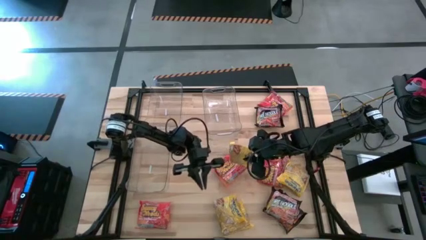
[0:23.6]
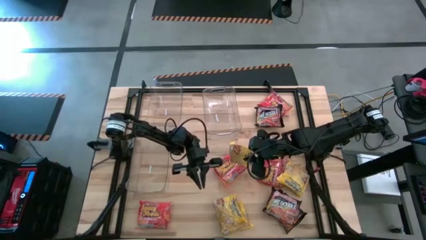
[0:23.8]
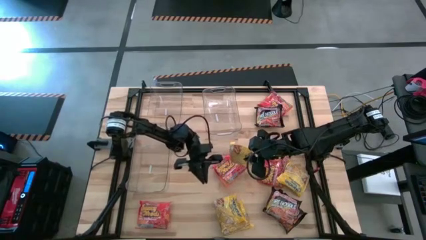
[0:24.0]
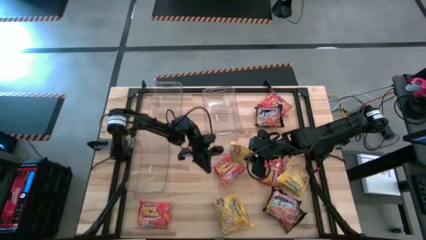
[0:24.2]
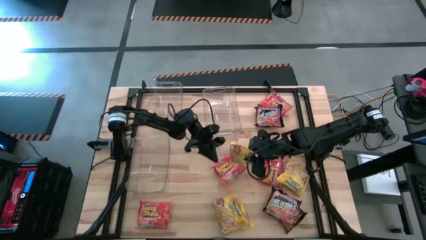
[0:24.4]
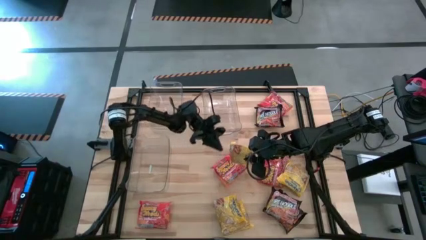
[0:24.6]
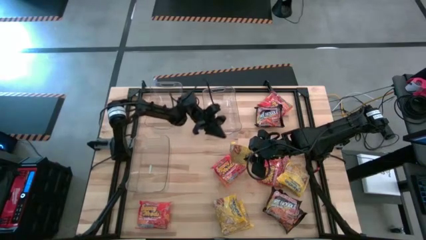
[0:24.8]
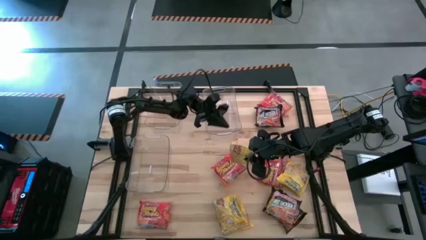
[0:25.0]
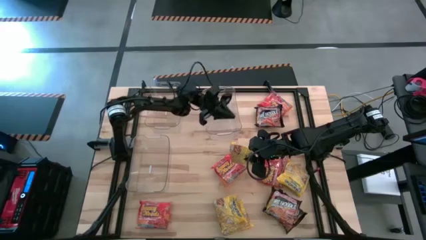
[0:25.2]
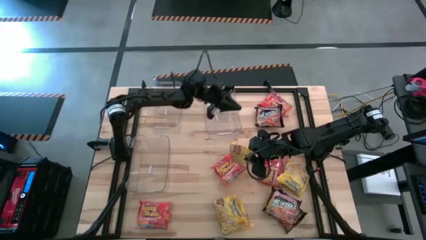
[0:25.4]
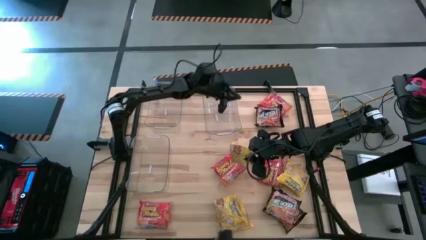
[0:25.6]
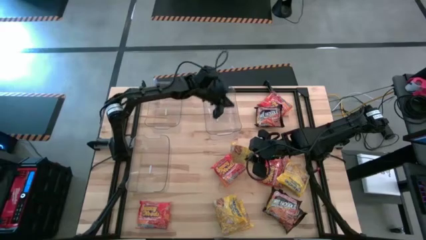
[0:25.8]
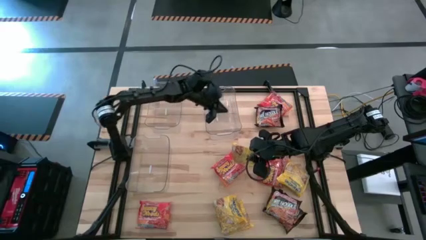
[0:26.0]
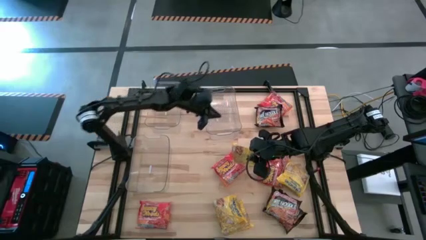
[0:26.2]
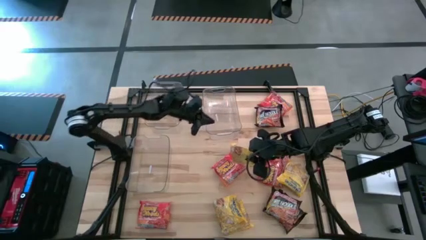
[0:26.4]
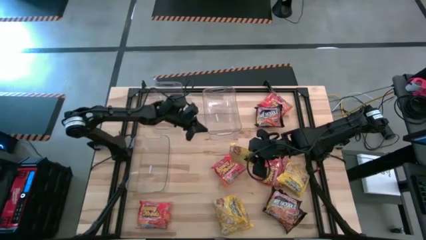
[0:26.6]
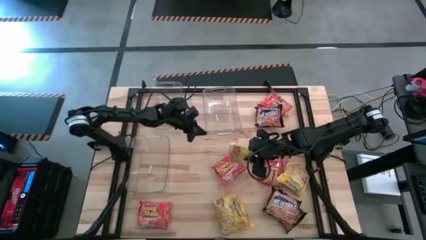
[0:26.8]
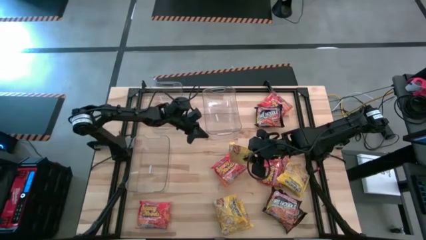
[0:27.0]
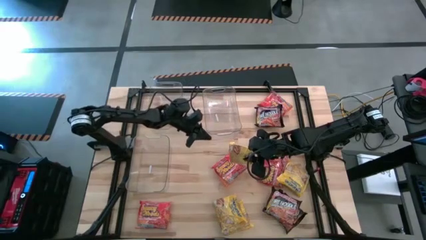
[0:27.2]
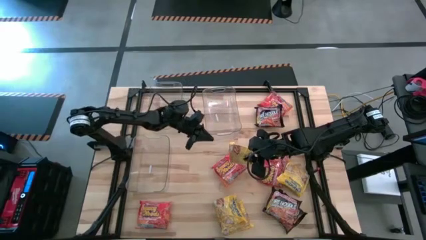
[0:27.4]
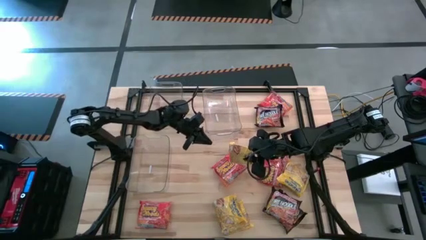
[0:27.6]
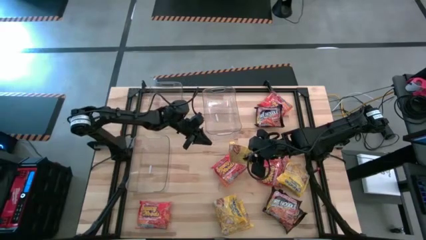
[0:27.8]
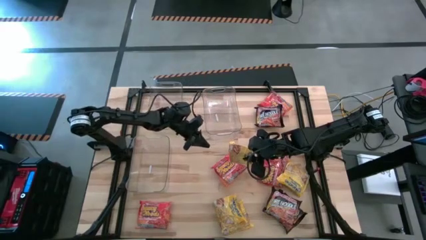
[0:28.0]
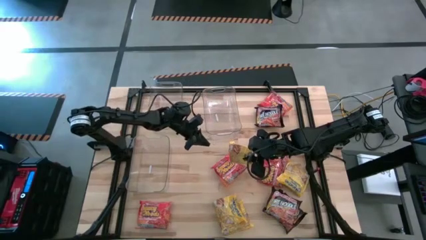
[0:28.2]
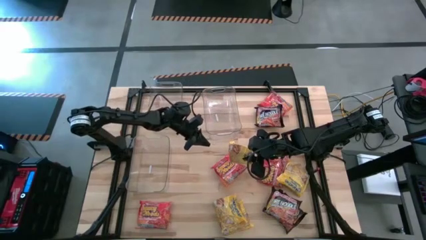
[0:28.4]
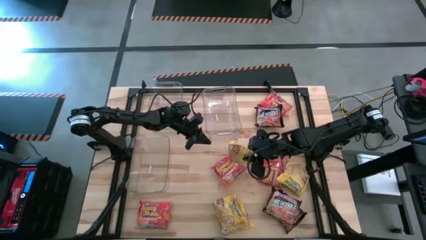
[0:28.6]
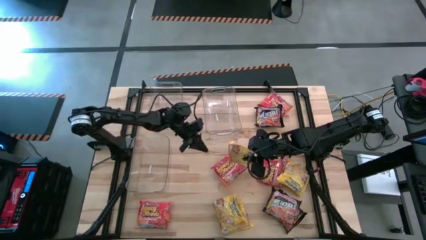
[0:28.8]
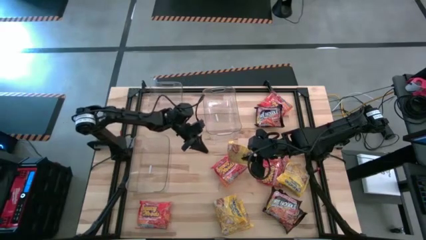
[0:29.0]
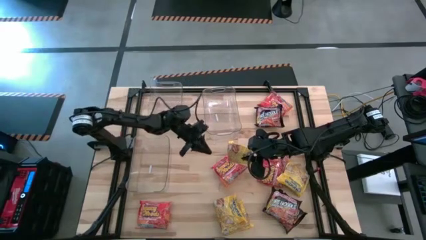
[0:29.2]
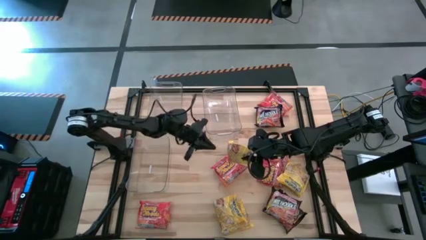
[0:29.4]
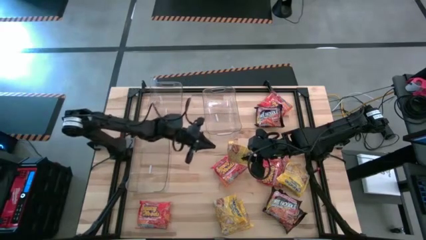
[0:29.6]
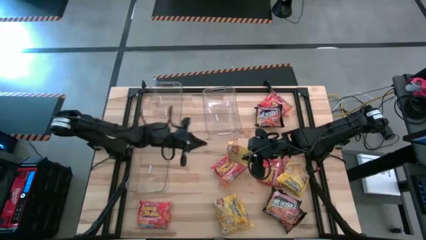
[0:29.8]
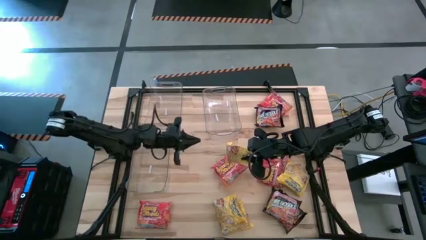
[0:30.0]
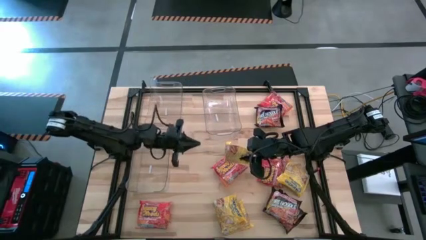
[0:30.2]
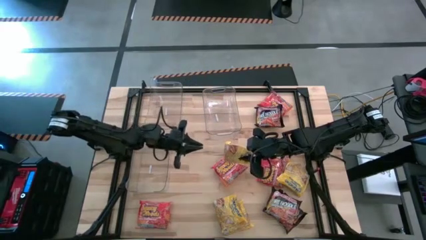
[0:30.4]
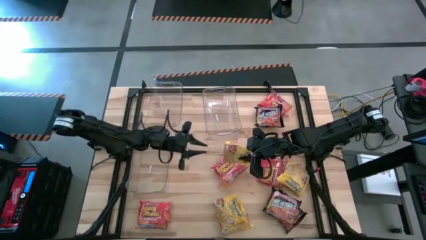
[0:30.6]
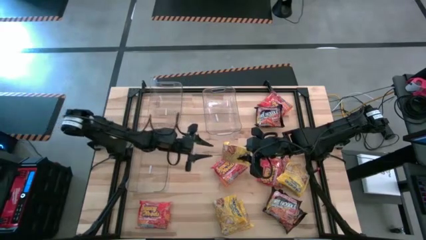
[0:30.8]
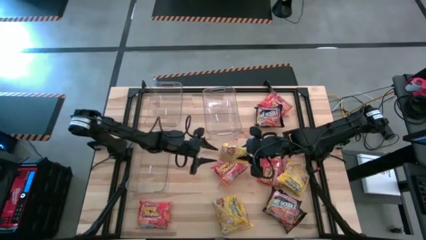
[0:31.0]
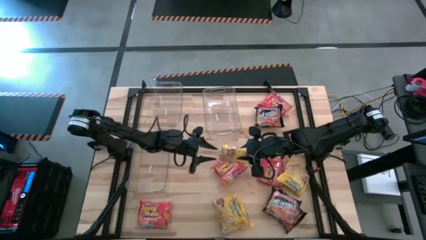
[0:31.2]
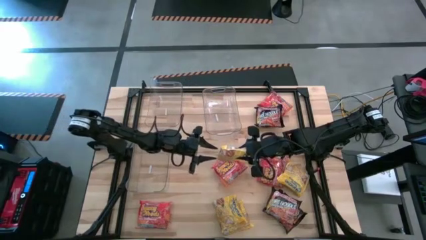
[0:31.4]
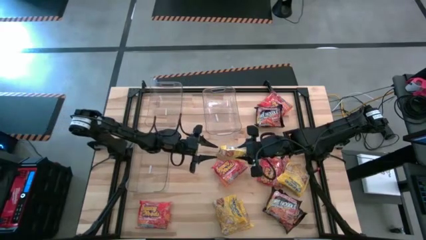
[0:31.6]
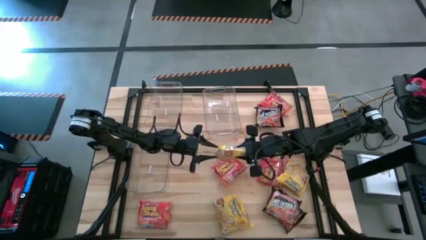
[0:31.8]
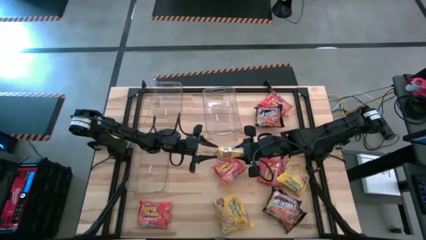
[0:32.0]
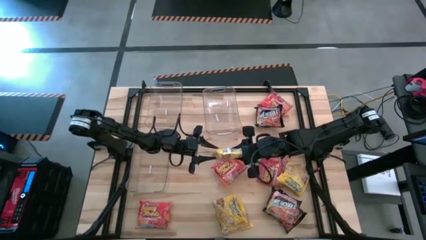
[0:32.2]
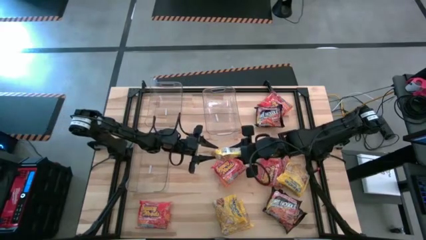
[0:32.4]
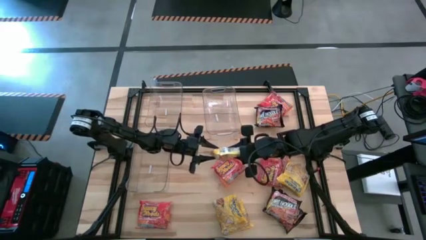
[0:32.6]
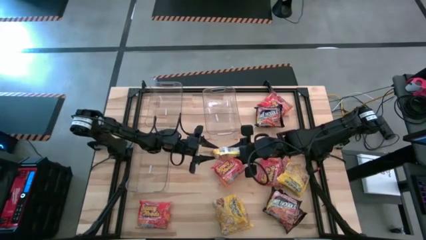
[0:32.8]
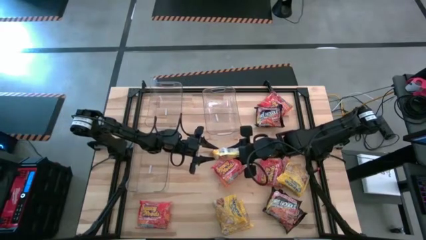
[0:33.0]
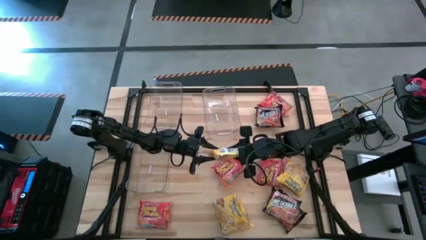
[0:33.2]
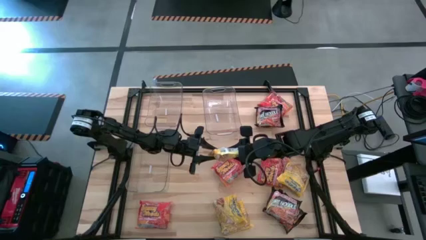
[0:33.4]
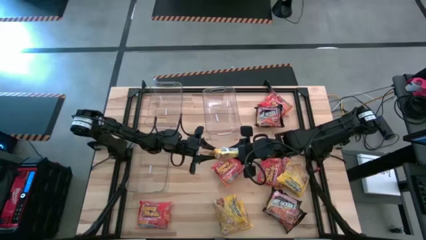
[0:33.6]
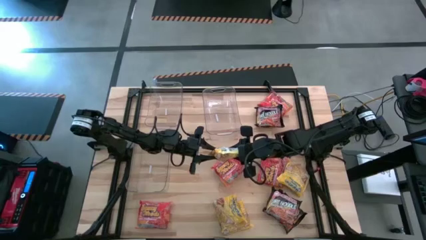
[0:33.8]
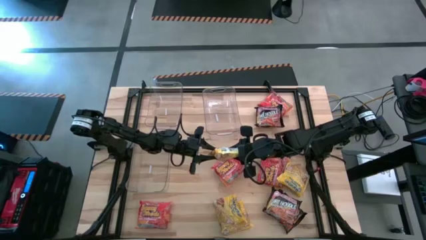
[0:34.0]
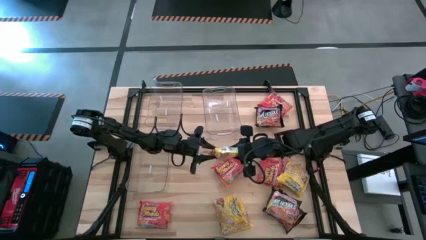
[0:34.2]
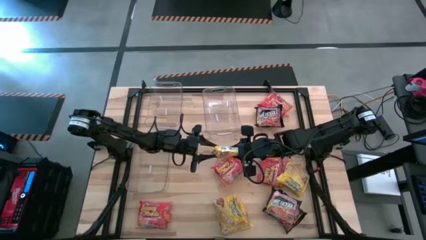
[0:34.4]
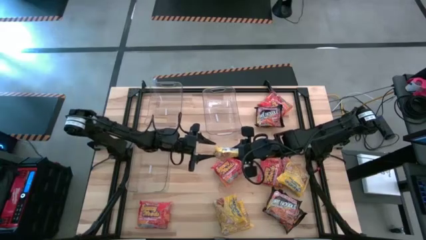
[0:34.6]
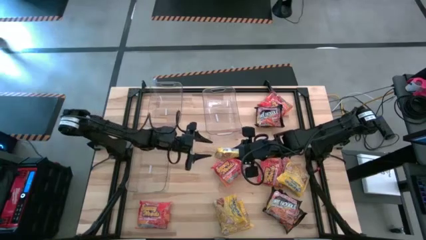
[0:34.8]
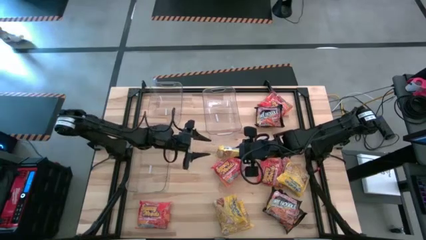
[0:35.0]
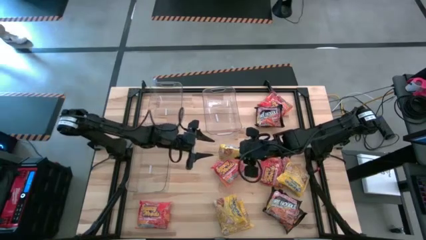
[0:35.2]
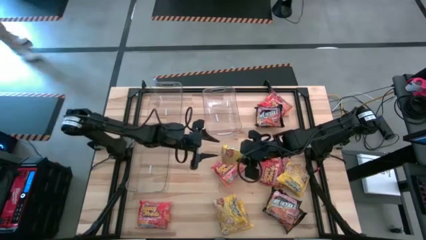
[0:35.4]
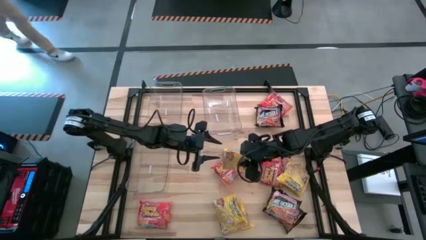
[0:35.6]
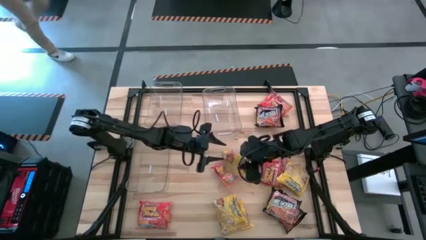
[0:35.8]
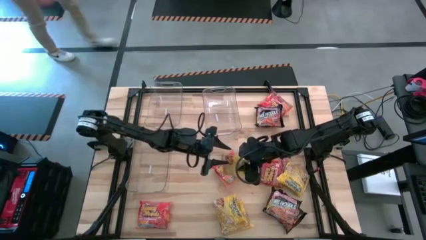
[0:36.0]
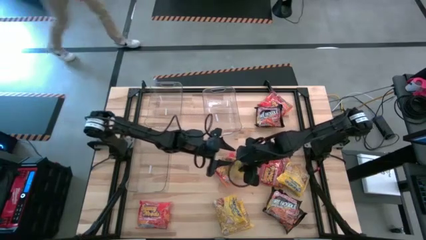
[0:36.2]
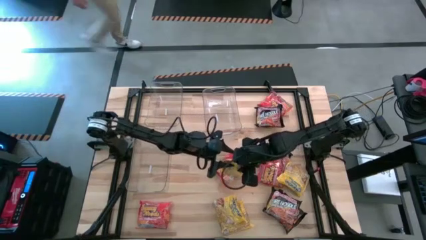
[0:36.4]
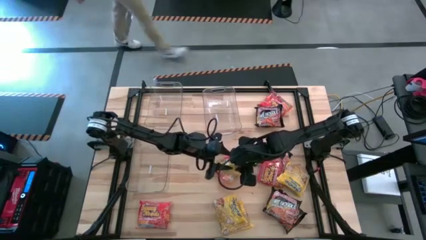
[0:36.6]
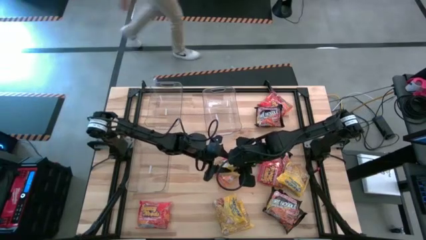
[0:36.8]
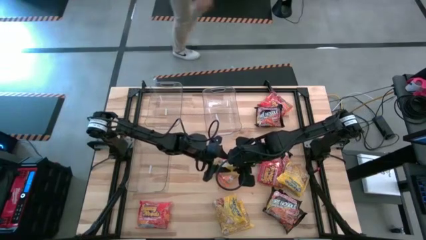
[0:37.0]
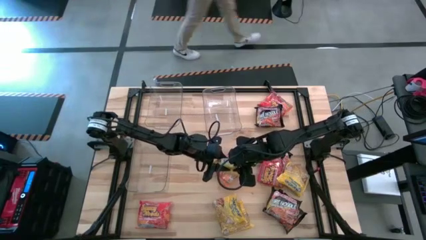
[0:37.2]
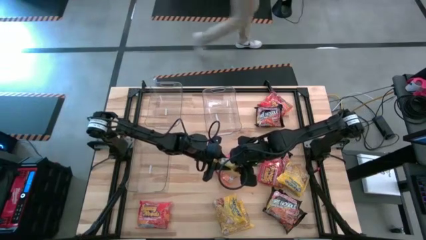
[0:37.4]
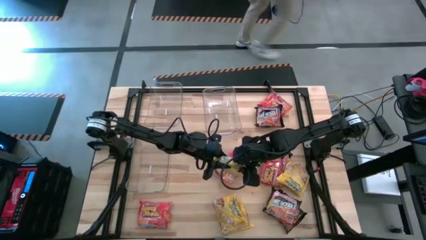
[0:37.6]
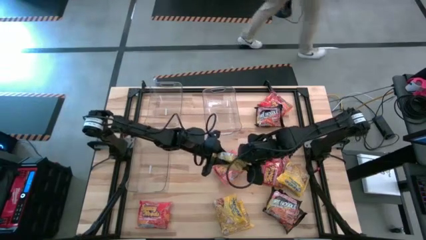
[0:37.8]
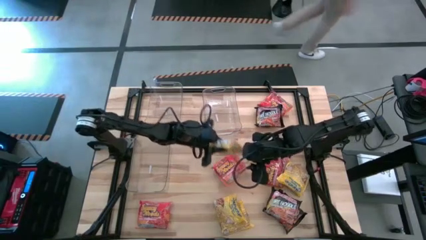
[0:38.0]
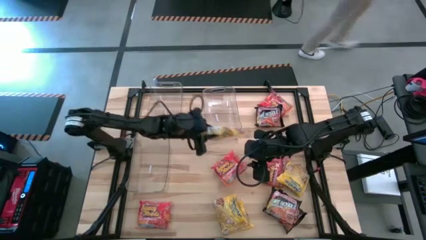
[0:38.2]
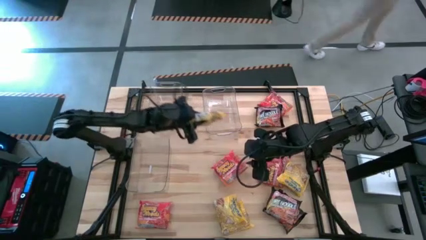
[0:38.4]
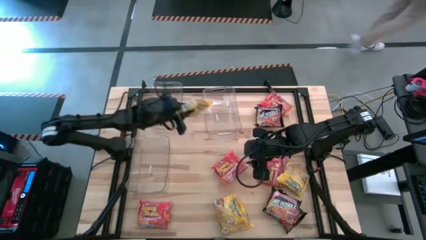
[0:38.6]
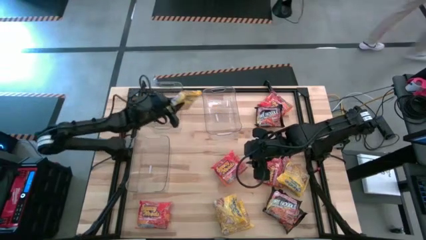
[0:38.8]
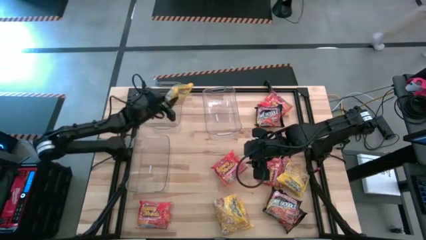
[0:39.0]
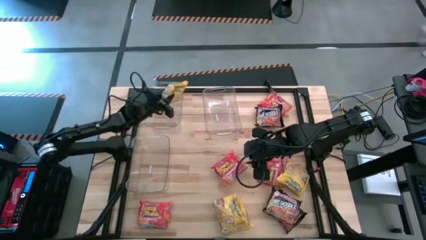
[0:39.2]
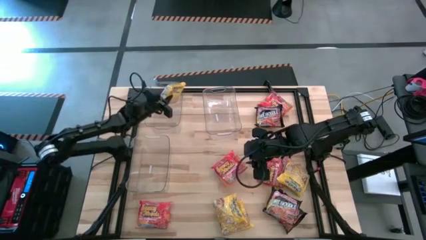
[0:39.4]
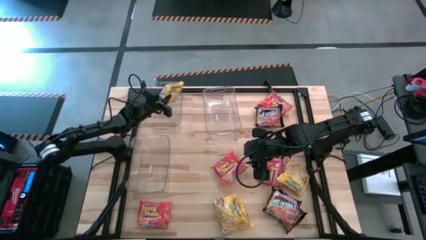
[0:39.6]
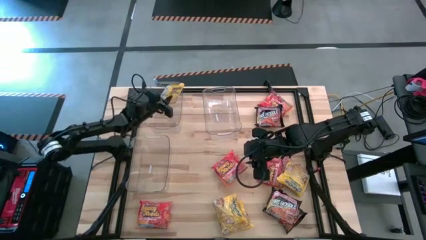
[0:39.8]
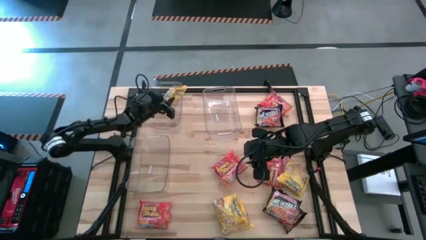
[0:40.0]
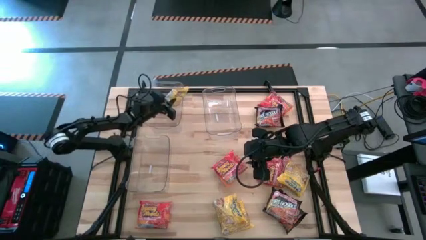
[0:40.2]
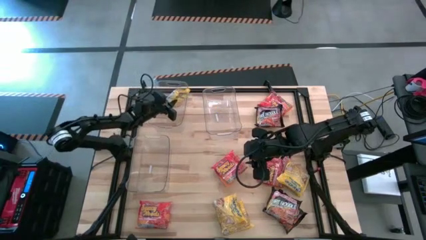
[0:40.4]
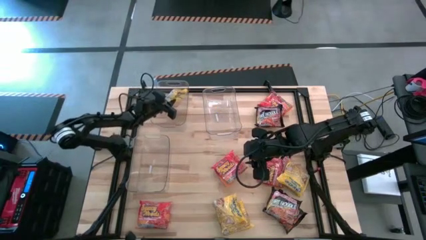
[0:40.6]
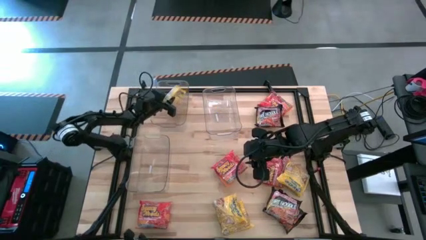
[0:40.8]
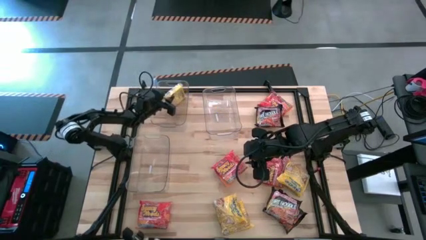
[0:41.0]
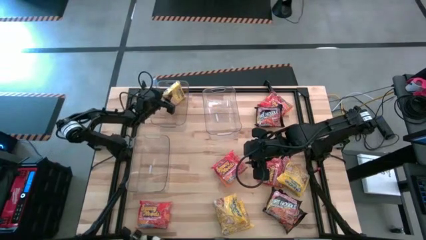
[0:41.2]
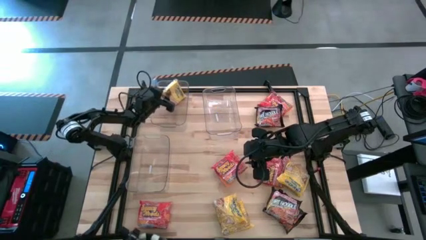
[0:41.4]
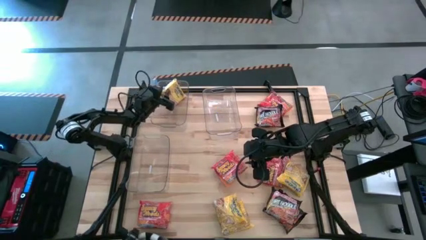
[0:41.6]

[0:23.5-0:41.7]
Task: Sort Maruchan noodles
Put the yellow noodle pack into the top left transparent bin
